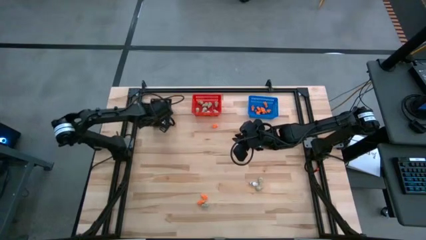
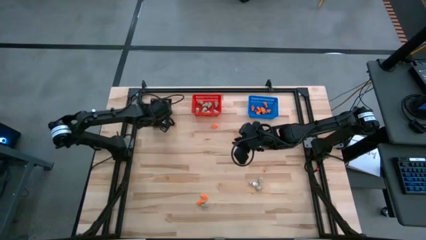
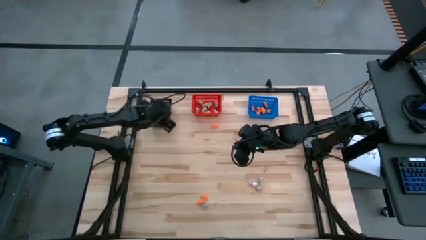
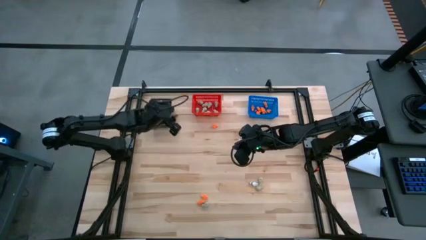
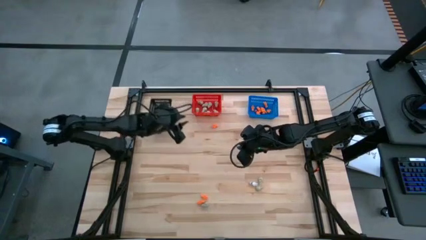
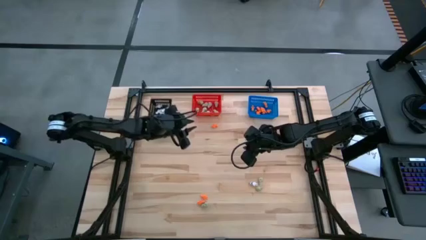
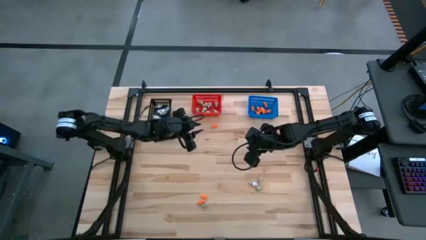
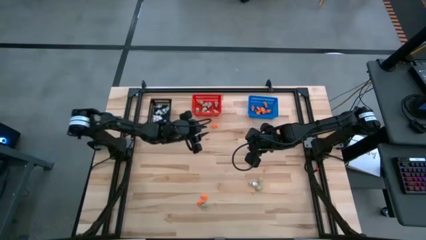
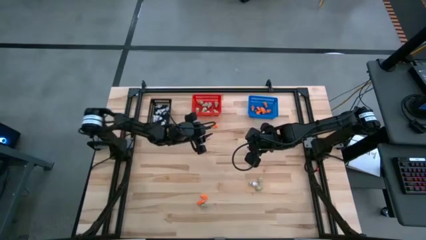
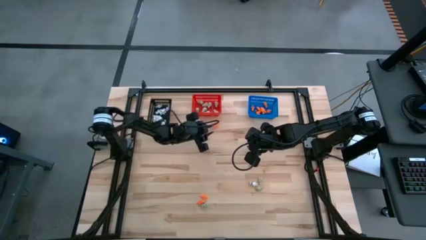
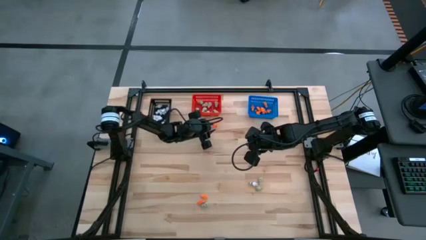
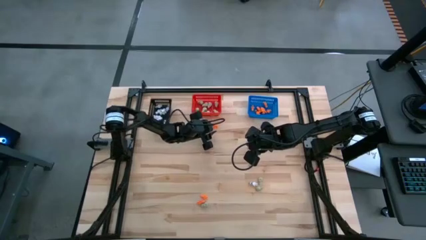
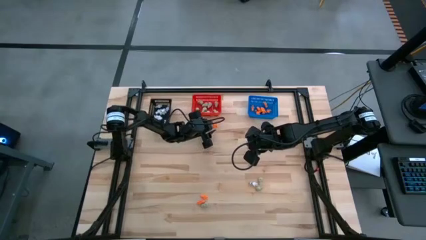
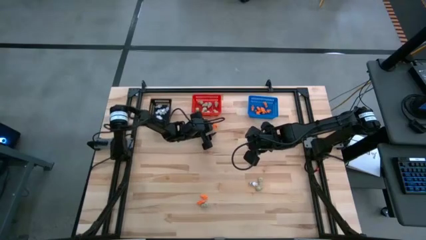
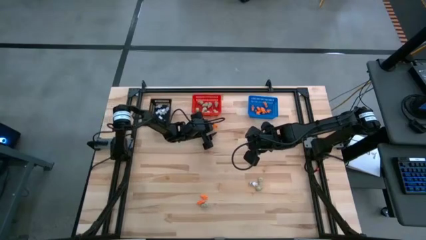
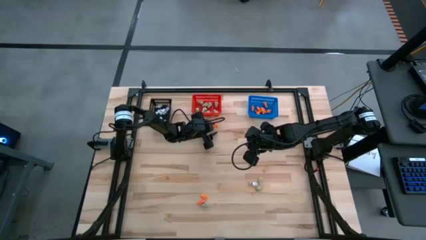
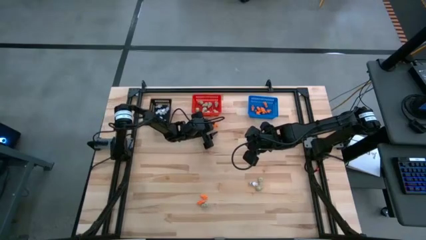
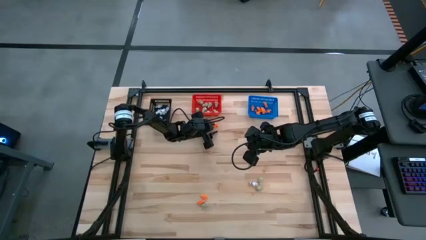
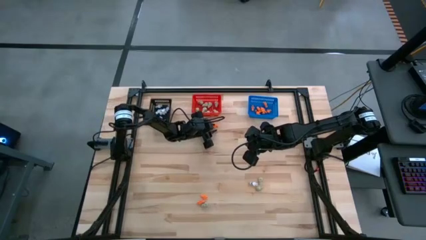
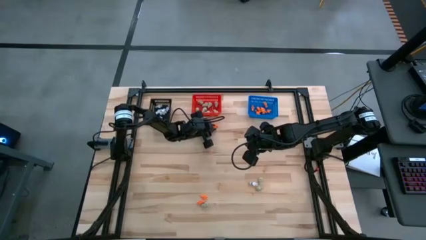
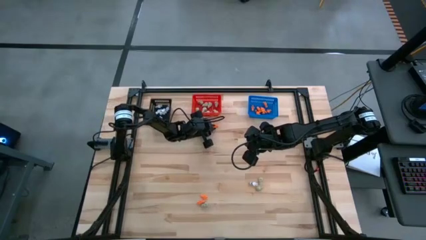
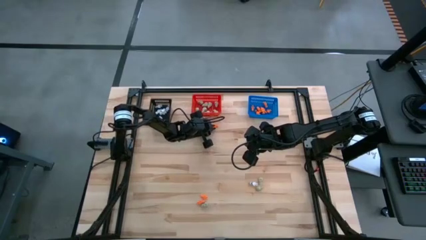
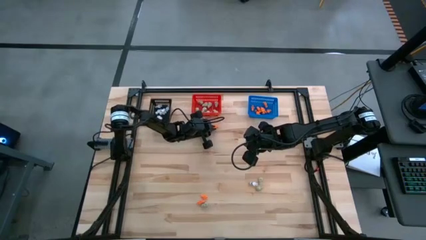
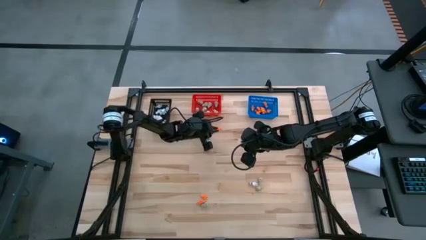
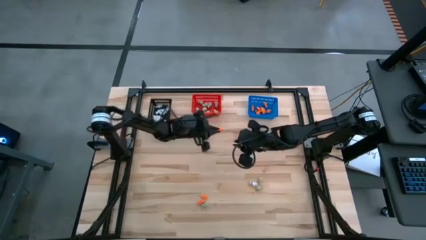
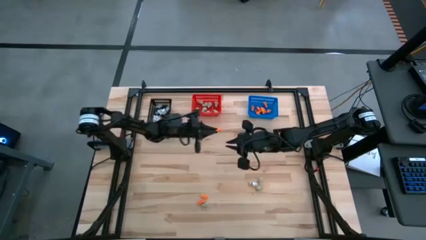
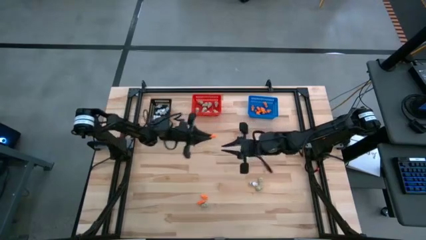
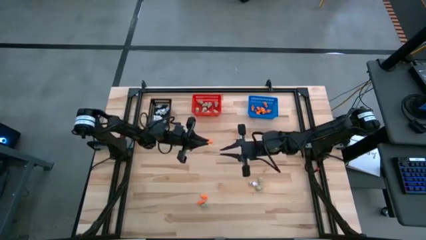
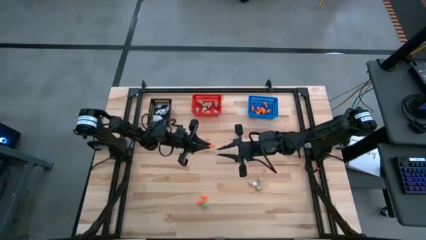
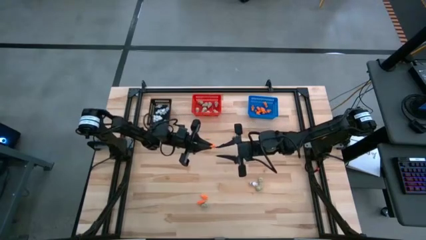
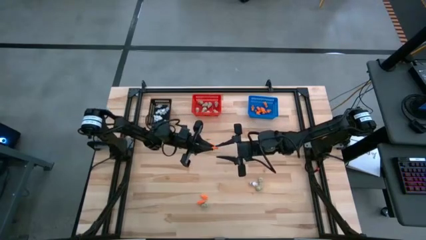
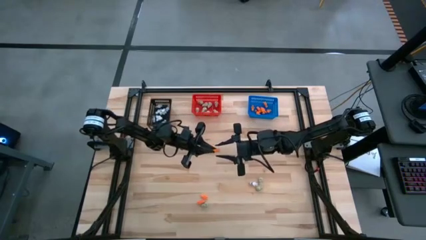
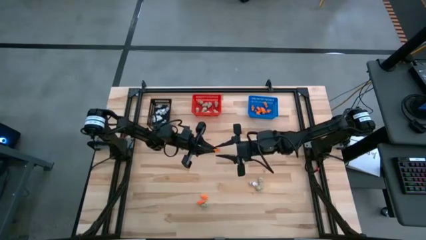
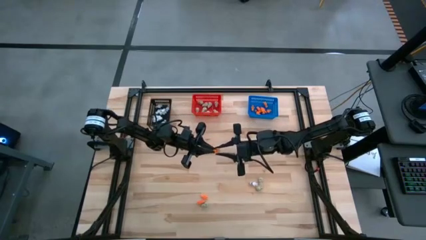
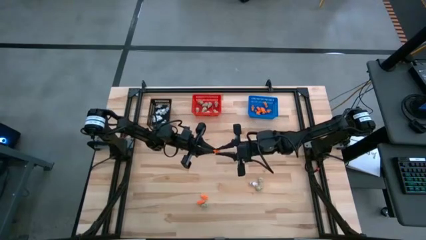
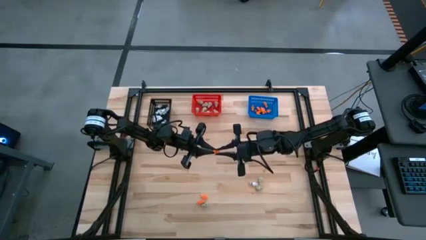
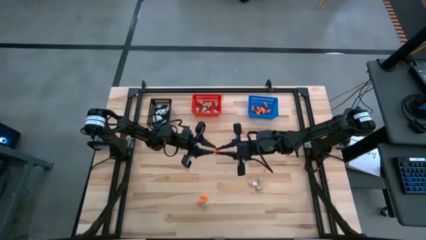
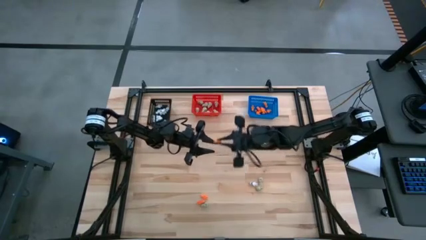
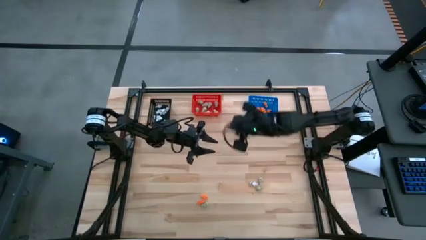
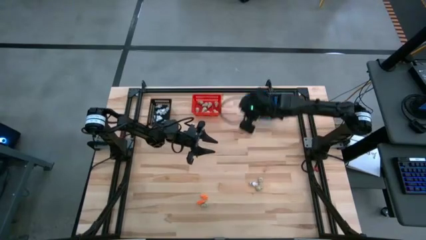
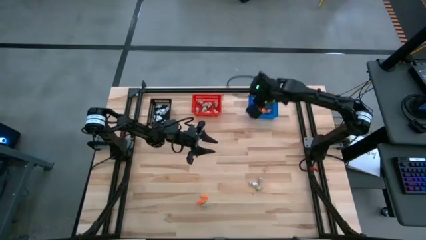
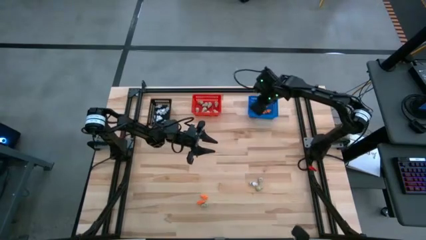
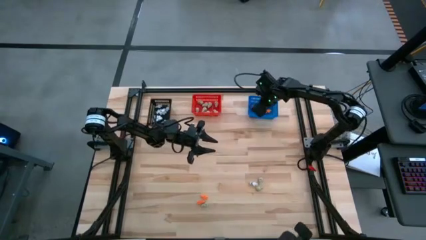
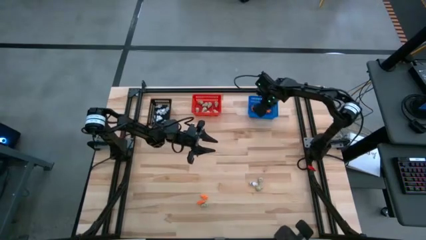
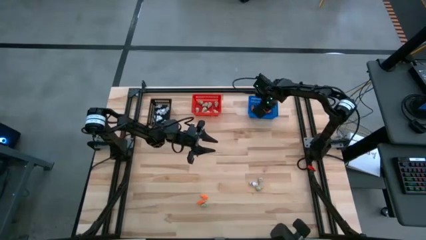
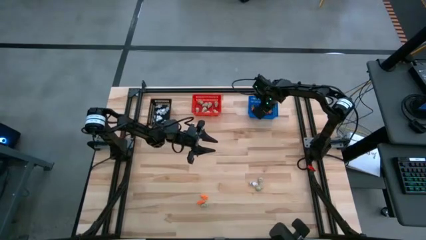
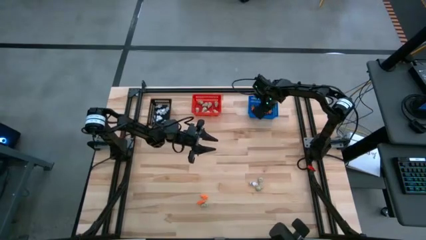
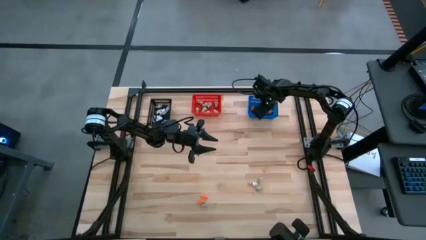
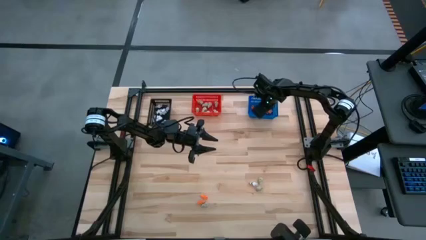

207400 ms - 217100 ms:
Task: Sort Halloween decoration
Put the orange skeleton toy into the blue bin

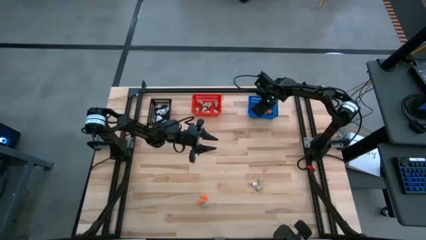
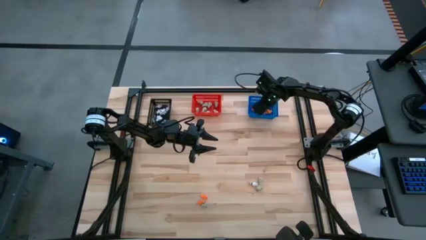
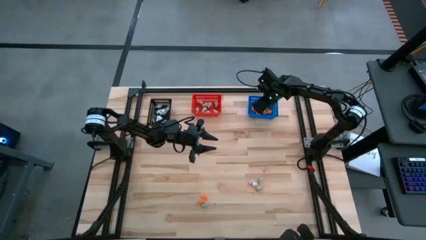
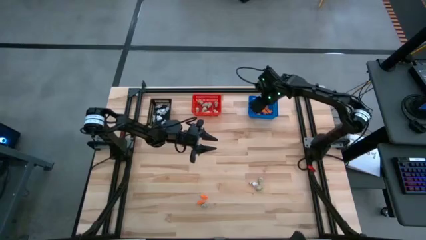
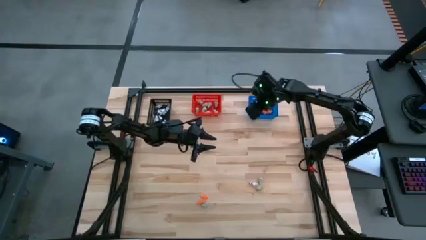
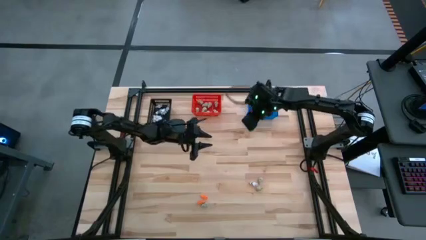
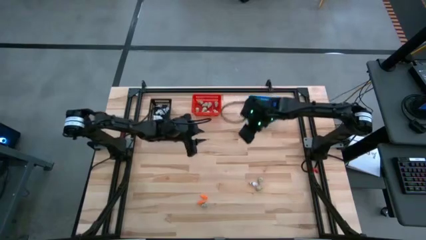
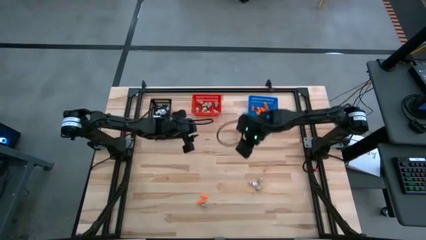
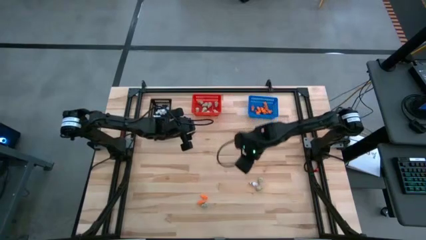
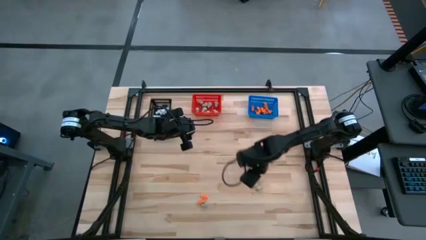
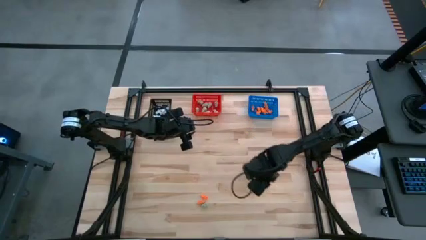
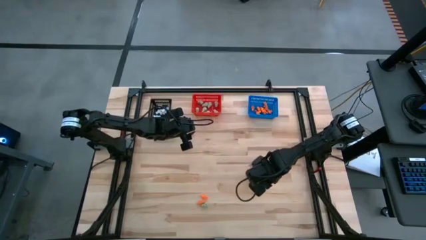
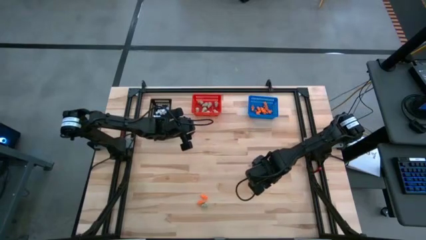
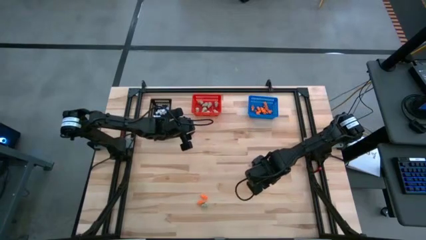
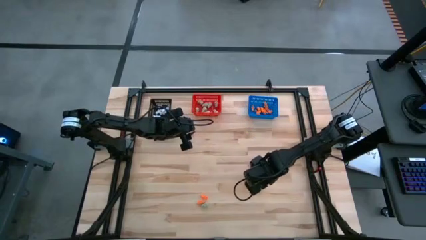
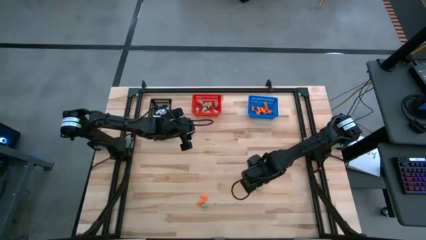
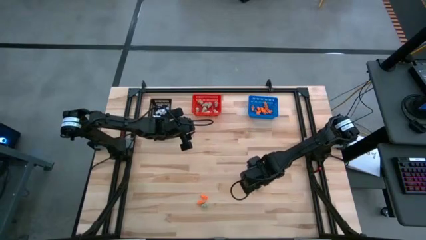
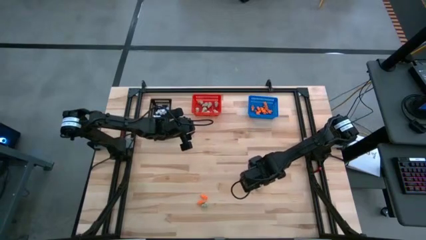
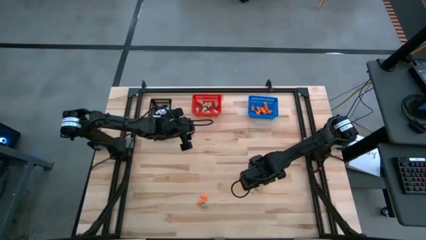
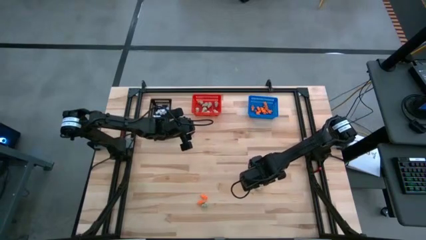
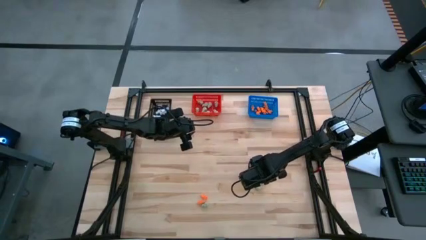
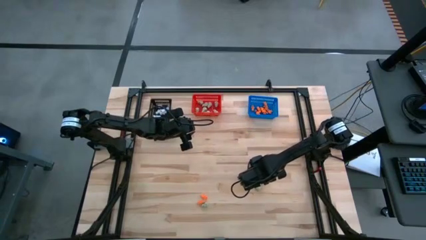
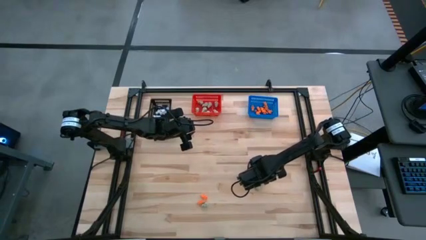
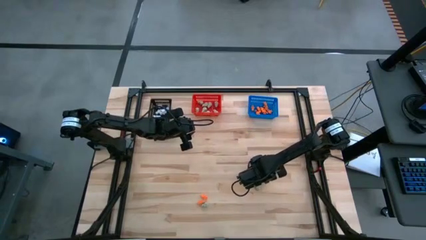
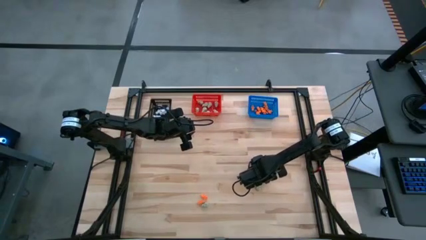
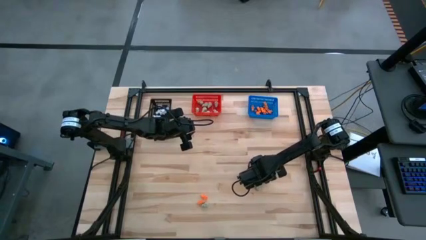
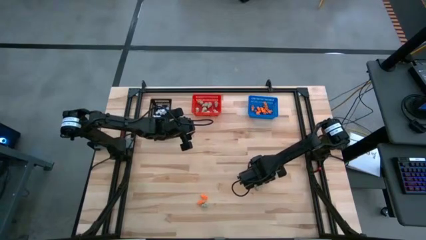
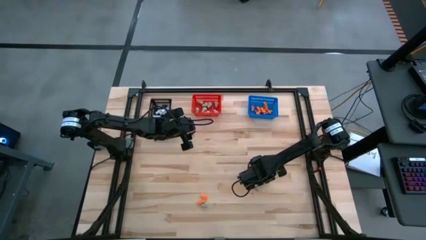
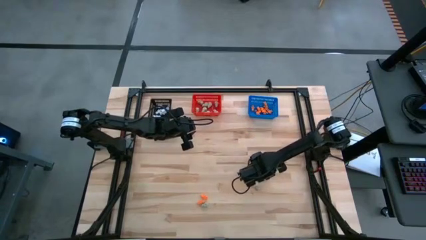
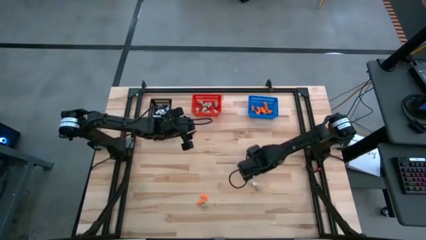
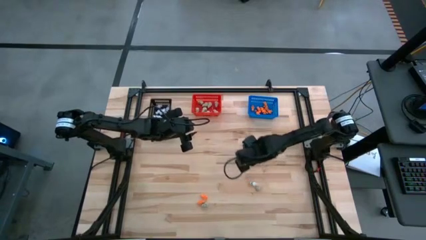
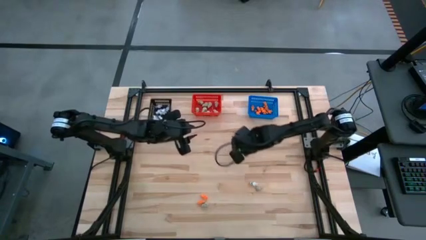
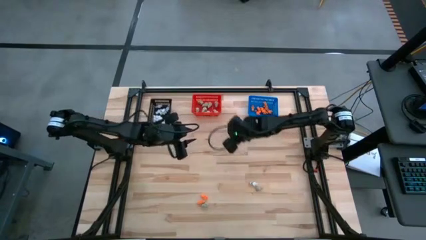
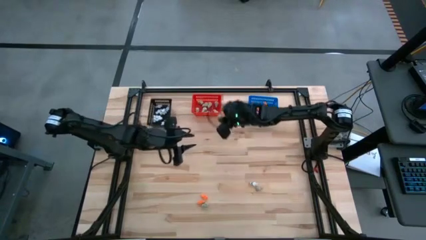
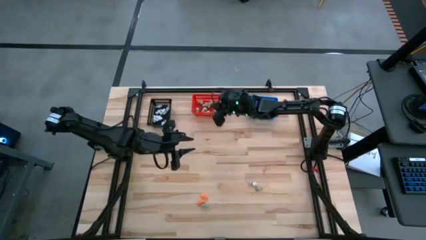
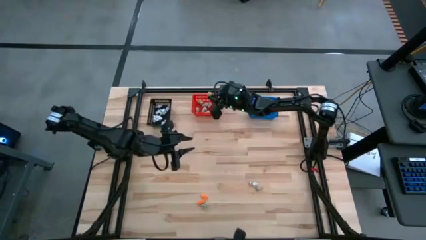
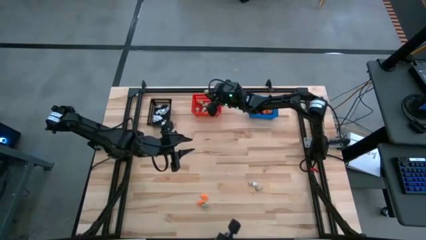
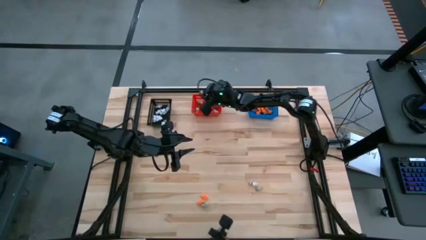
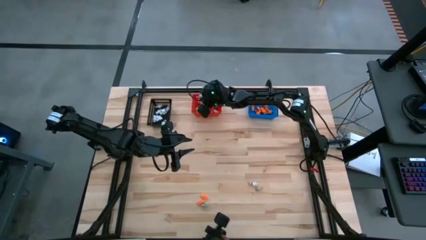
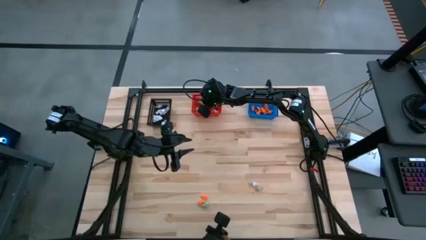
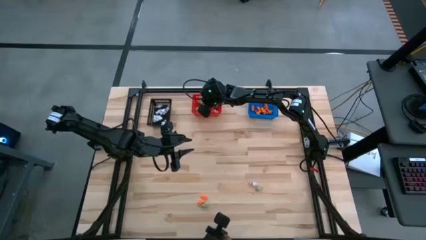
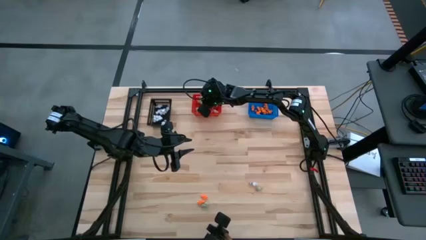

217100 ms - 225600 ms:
Put the white skull toy into the red bin
